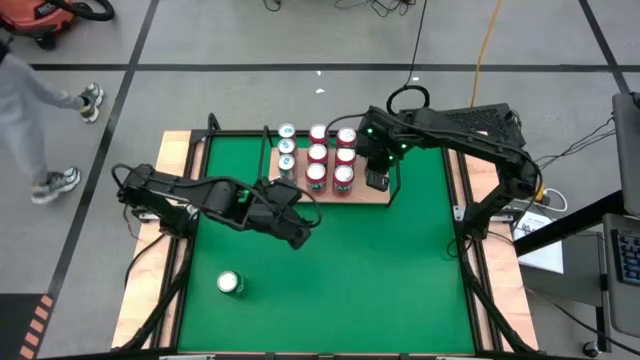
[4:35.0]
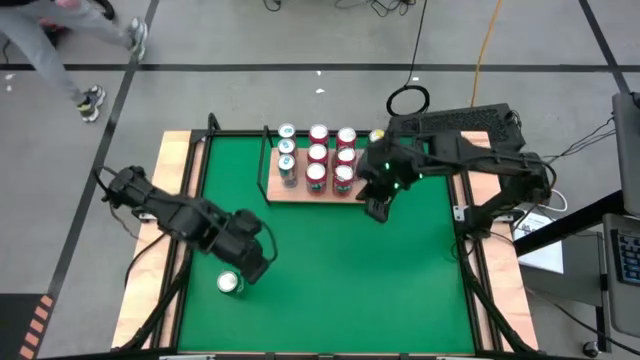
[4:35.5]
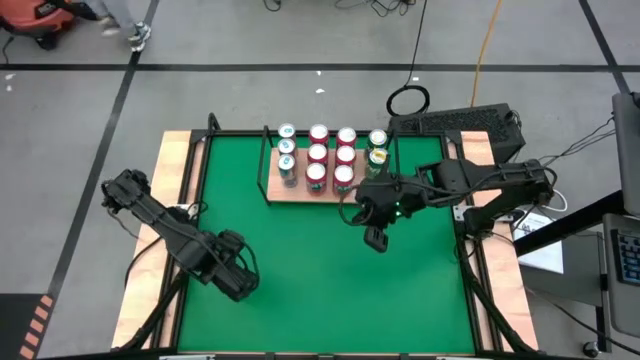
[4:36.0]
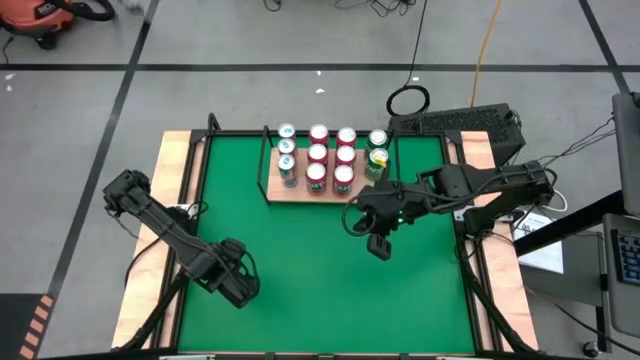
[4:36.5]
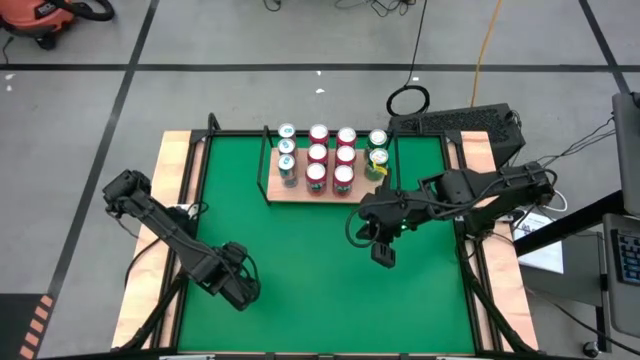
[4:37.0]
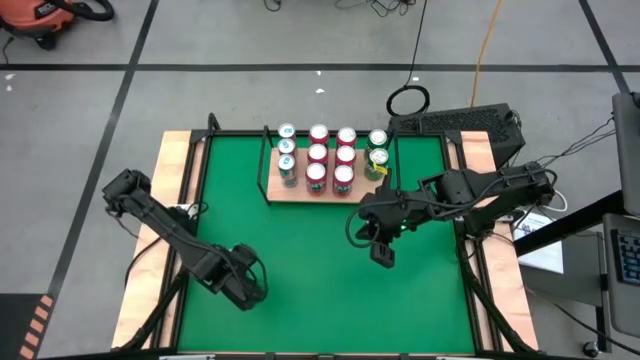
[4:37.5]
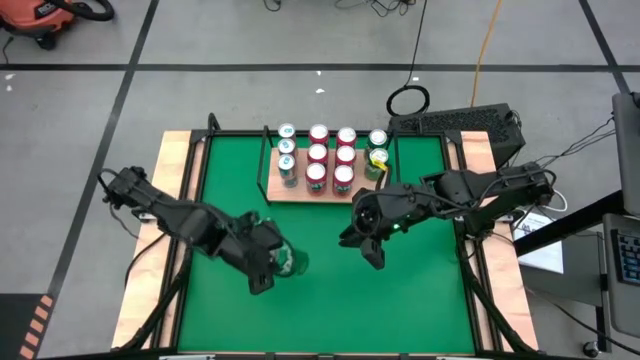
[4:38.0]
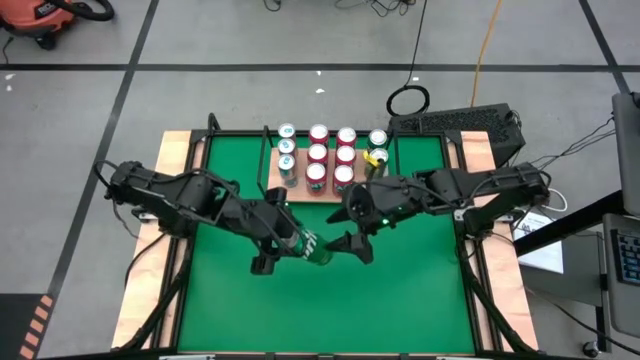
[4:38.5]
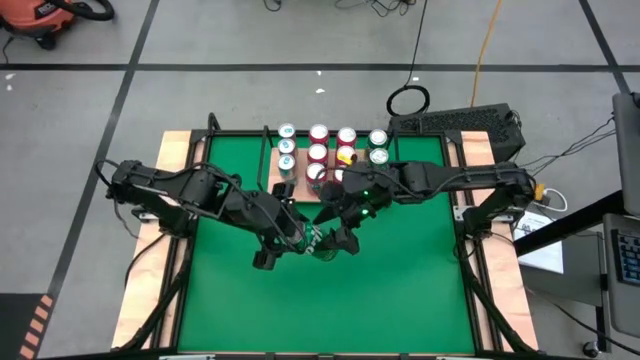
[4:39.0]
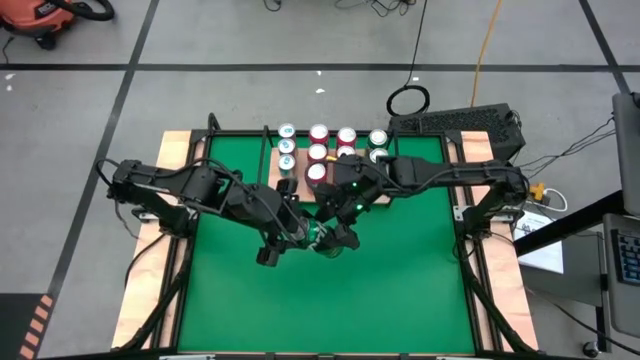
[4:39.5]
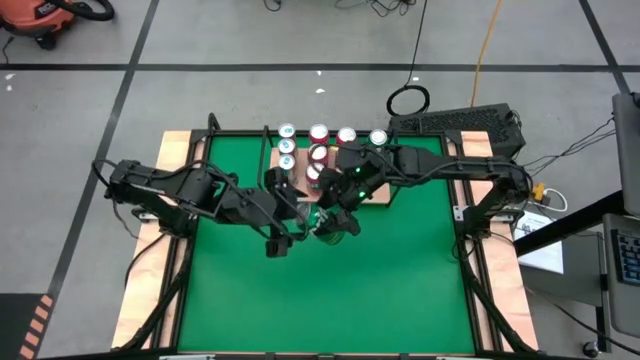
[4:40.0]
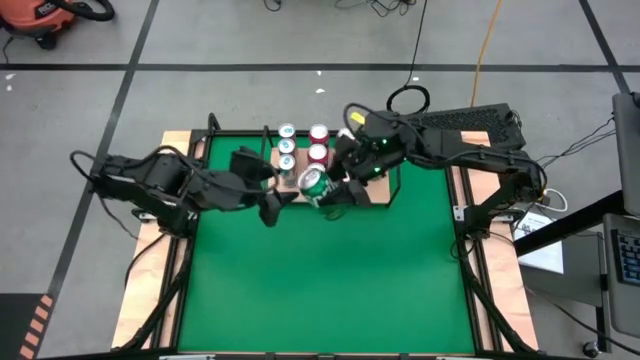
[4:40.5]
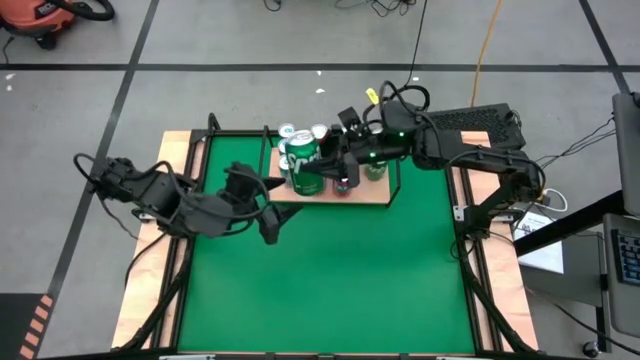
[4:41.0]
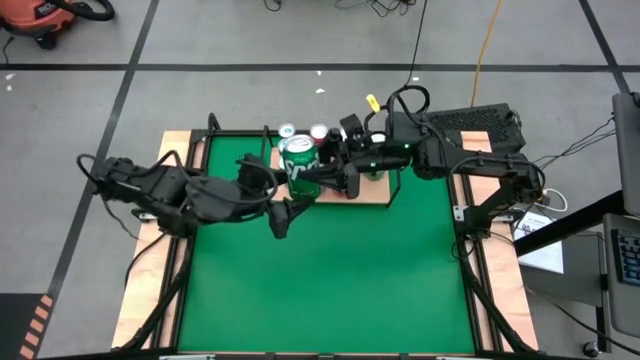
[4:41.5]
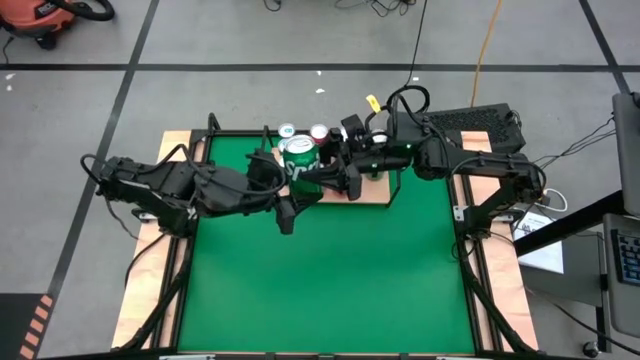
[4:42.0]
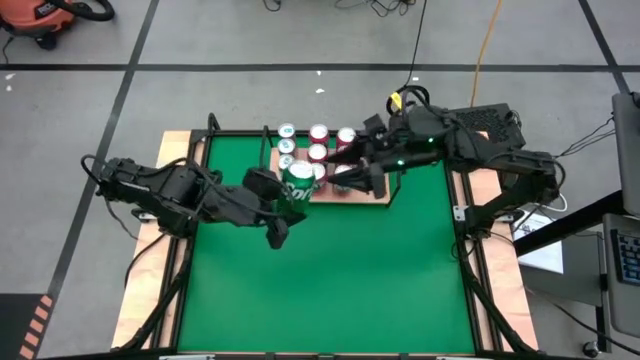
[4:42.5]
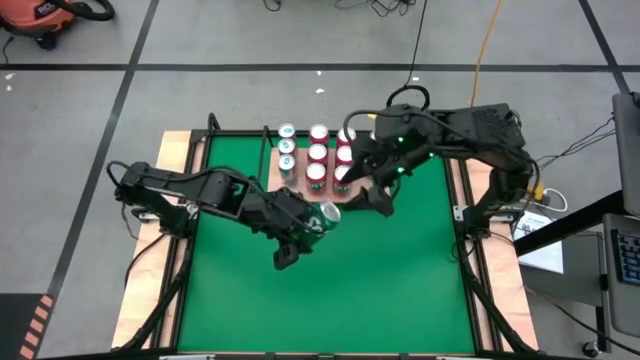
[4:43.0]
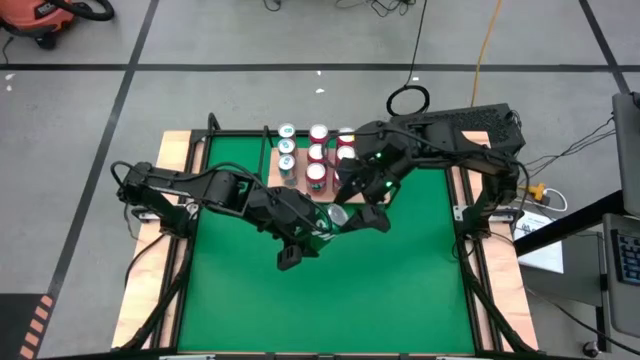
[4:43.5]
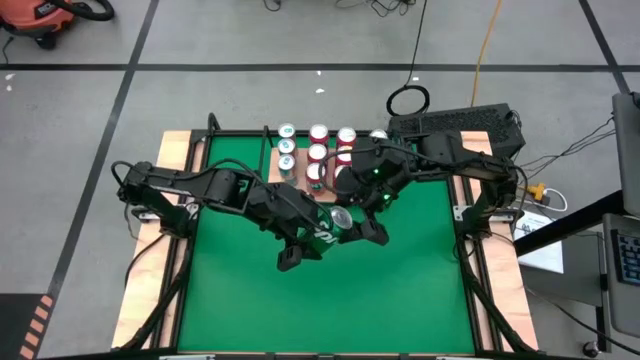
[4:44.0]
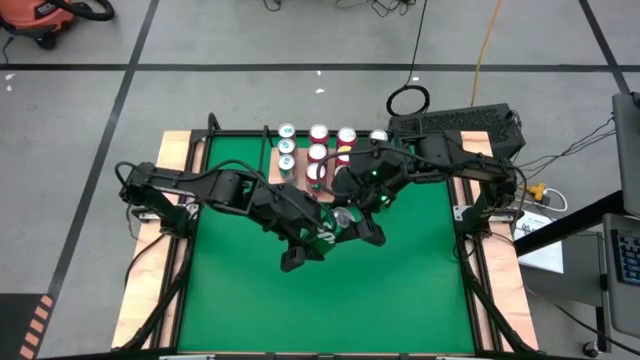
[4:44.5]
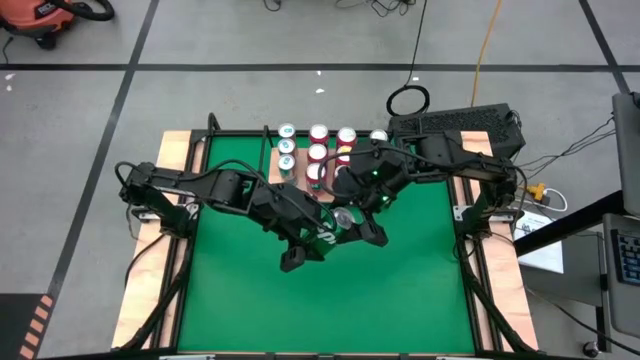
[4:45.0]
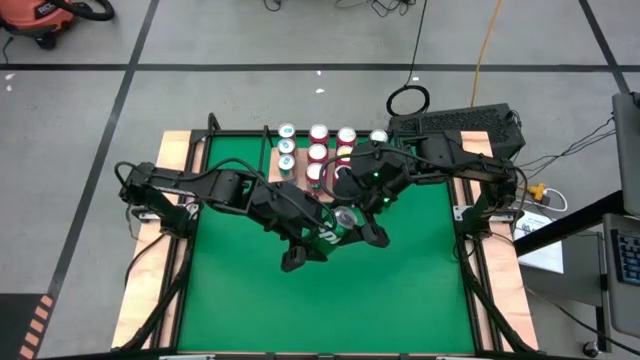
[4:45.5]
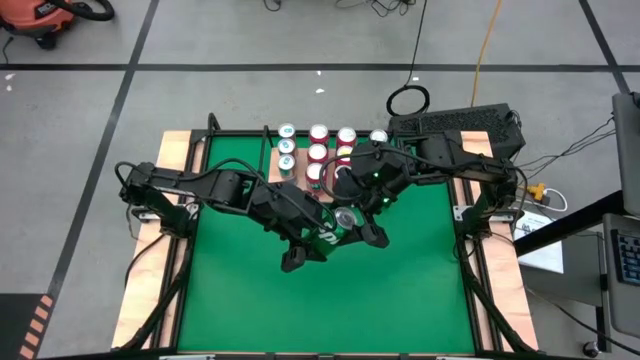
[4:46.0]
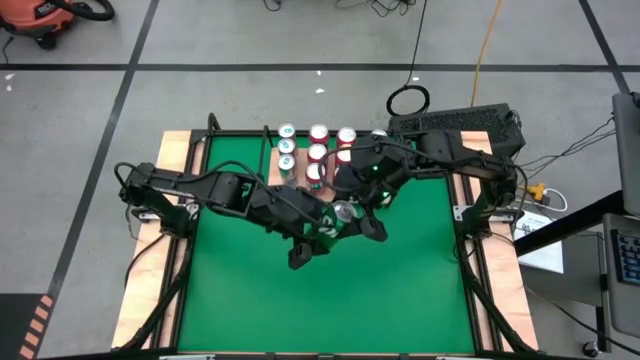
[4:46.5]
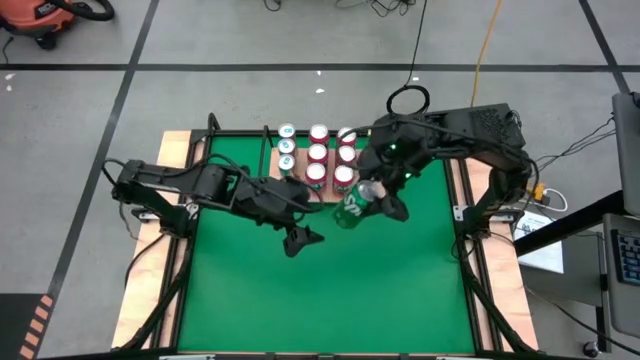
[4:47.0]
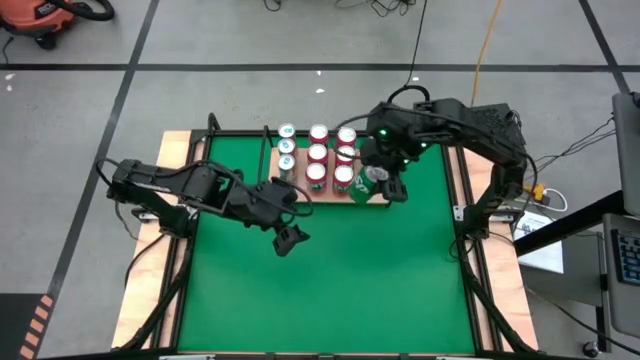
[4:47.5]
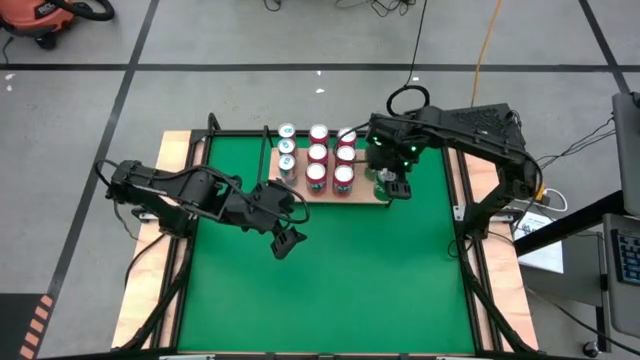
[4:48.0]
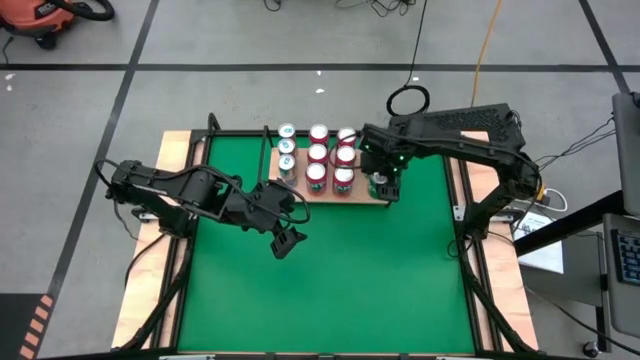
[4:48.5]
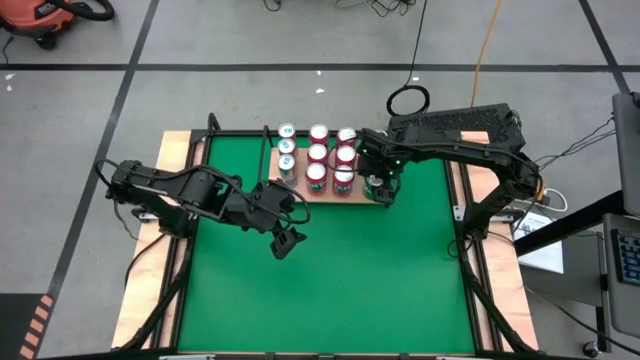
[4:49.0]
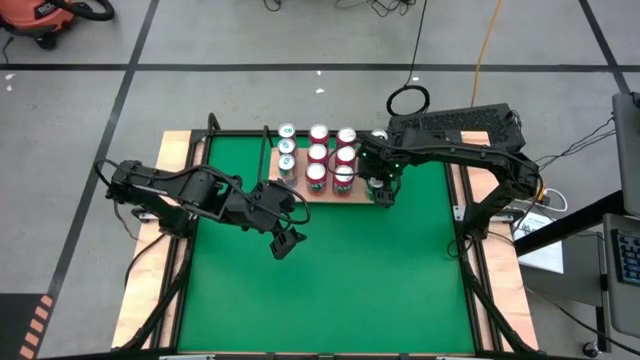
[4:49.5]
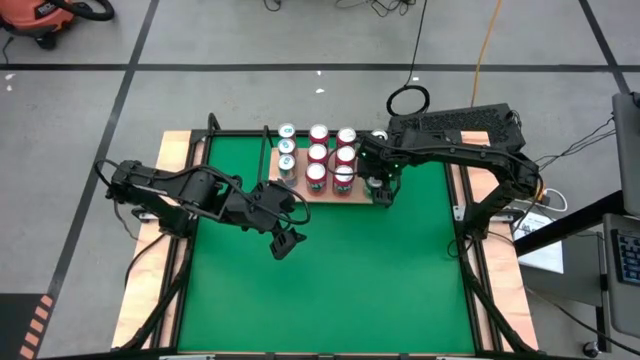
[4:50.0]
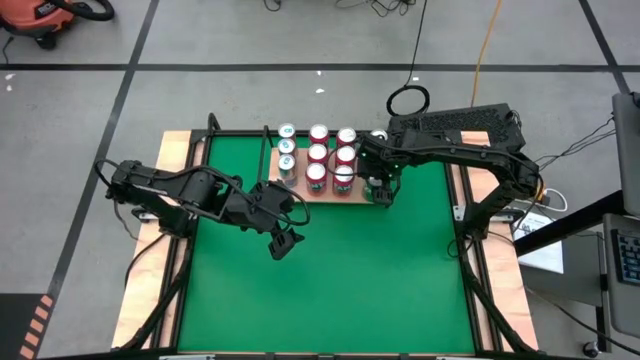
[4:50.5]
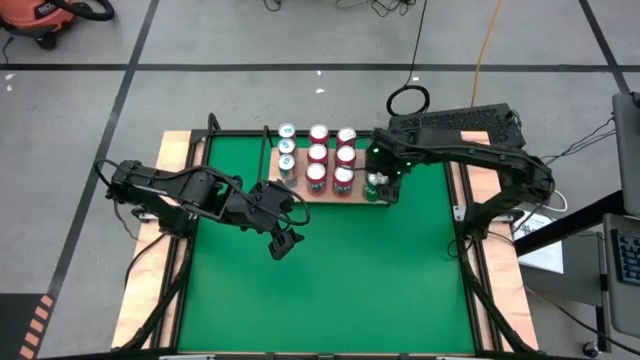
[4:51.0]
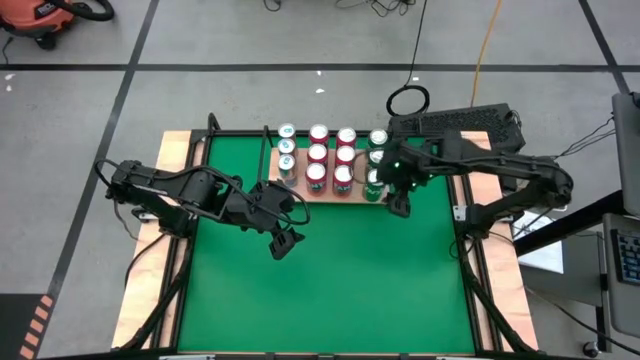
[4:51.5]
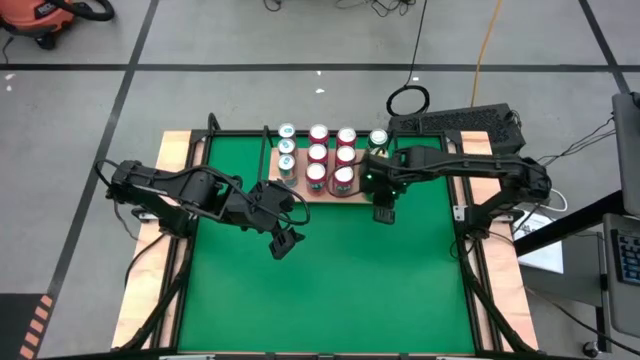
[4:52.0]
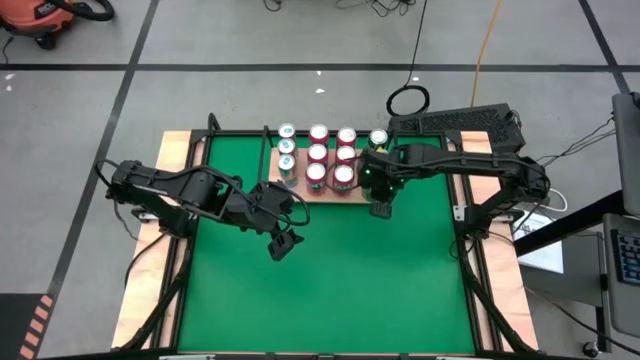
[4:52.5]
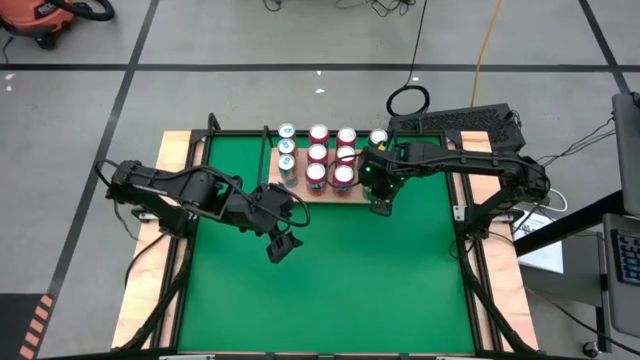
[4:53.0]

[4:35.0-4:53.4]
Task: Place canned beverage on shelf
Put the green soda can on the shelf aligned with the other green soda cans

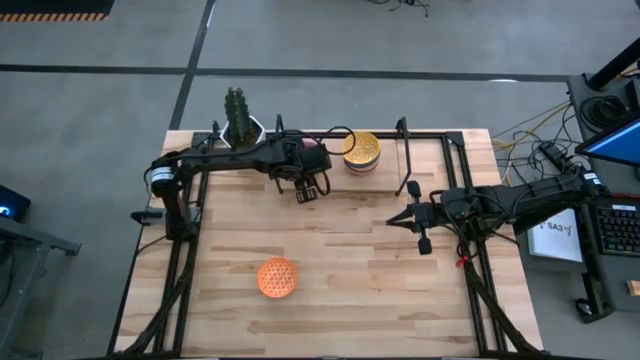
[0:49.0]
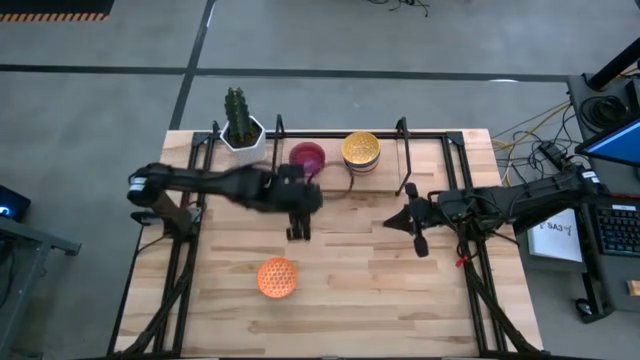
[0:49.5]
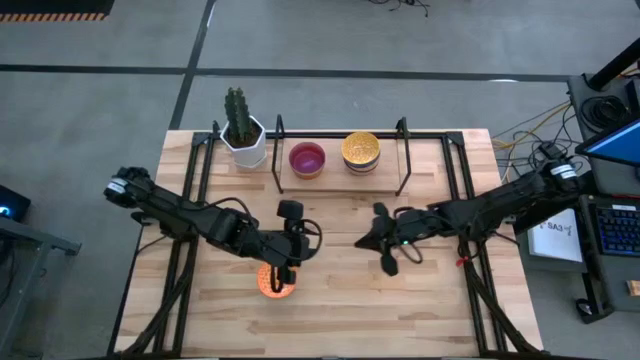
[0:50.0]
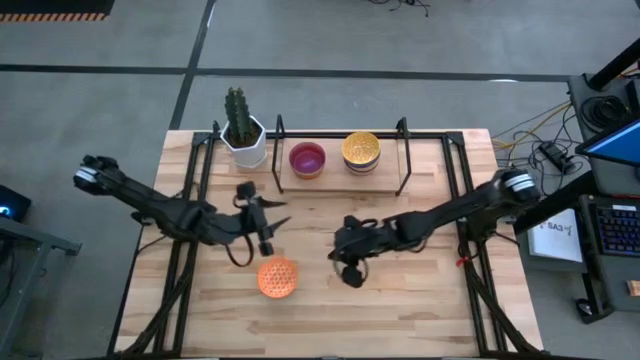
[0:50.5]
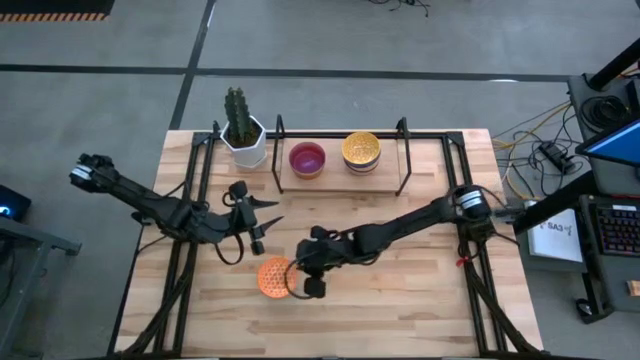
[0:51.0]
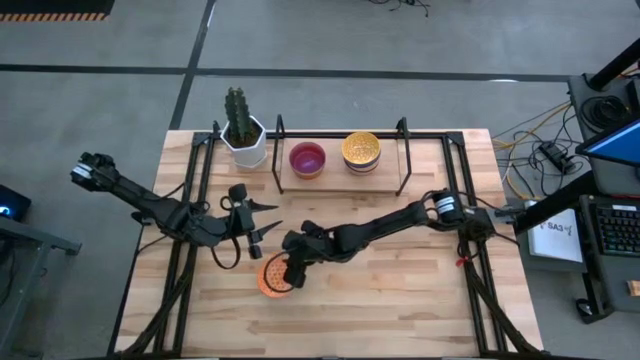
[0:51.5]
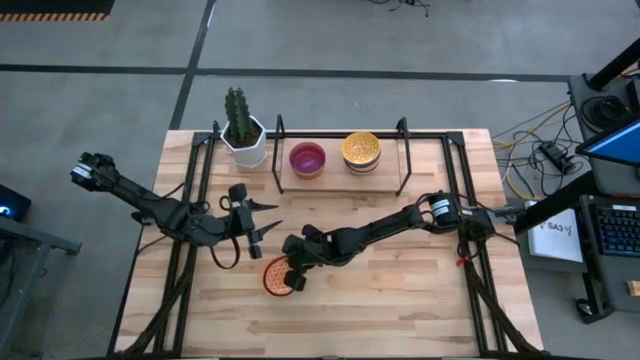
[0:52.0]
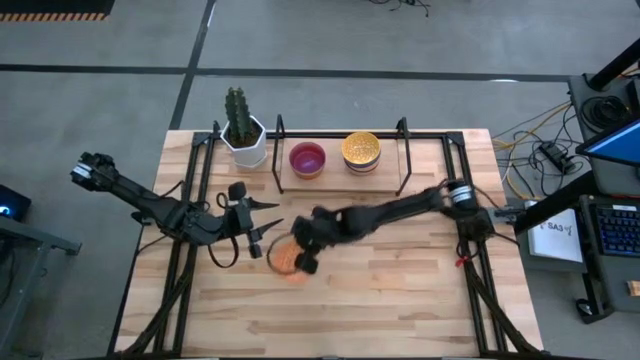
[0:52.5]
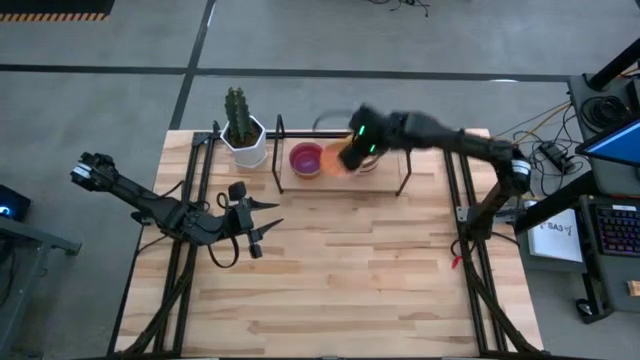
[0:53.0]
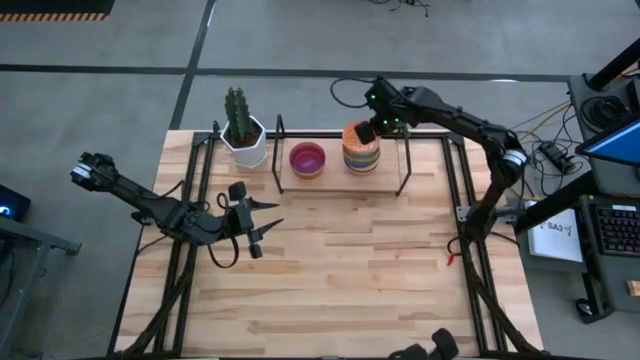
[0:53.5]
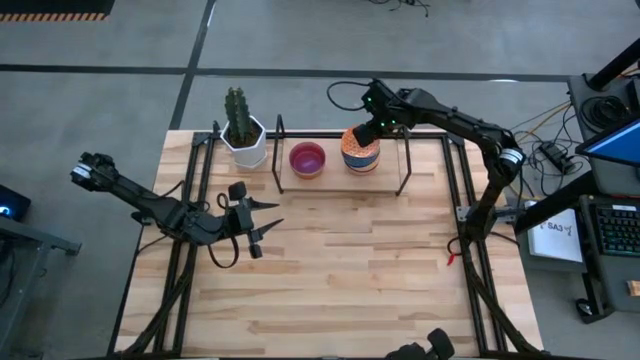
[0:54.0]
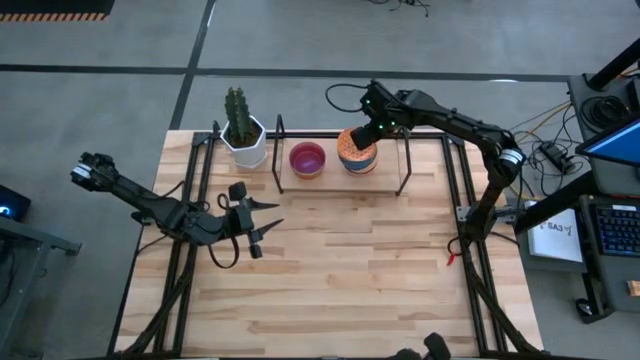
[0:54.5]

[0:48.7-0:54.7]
Task: Place and stack bowls onto a shelf
Stack the orange patterned bowl on the yellow patterned bowl on the shelf
